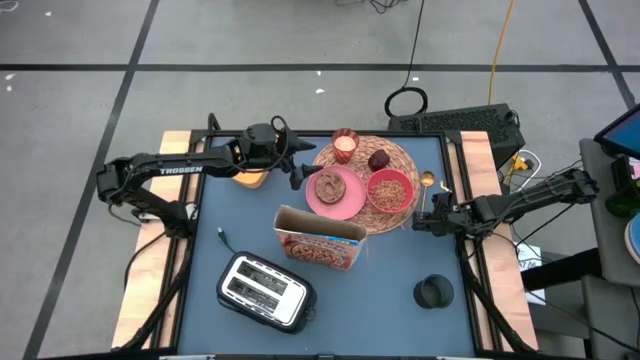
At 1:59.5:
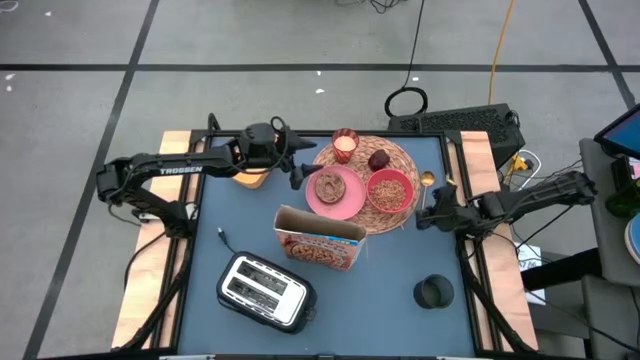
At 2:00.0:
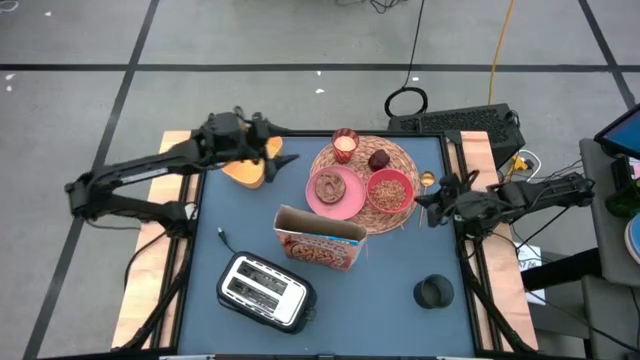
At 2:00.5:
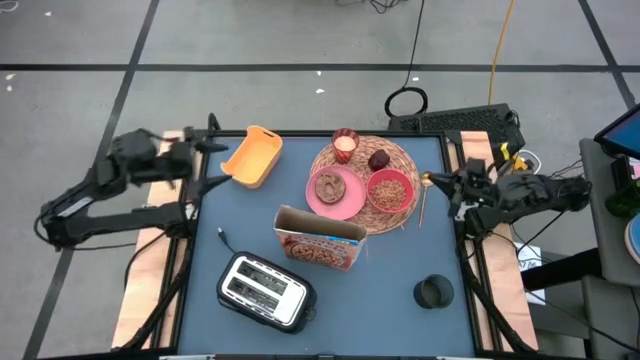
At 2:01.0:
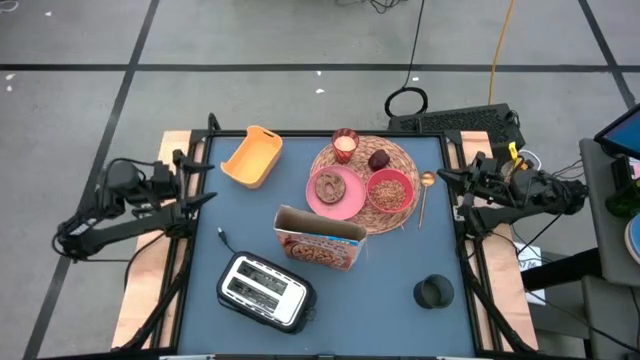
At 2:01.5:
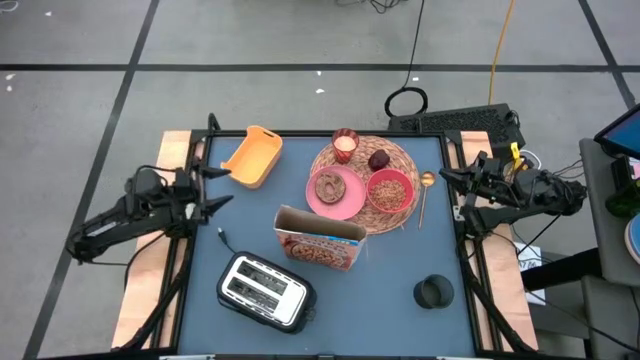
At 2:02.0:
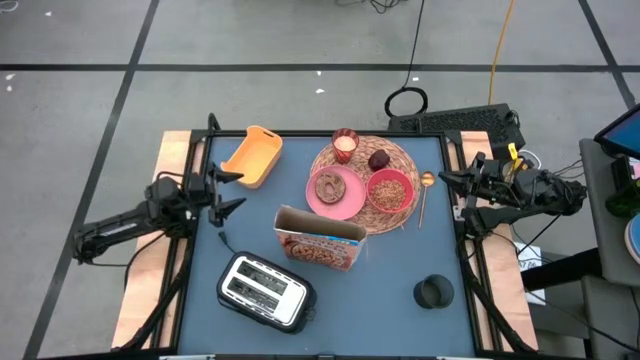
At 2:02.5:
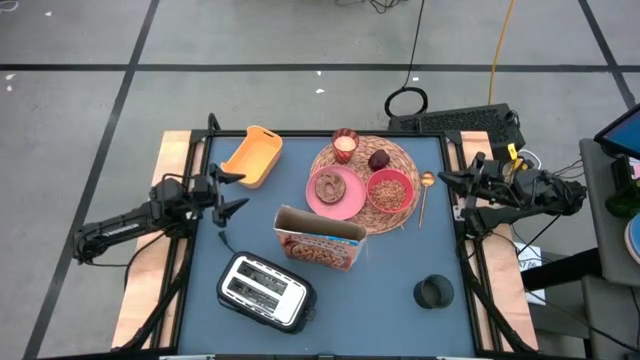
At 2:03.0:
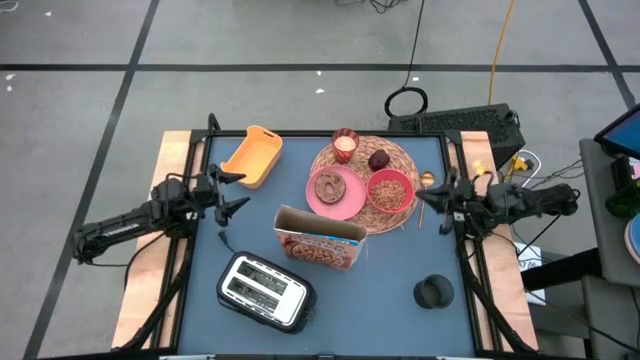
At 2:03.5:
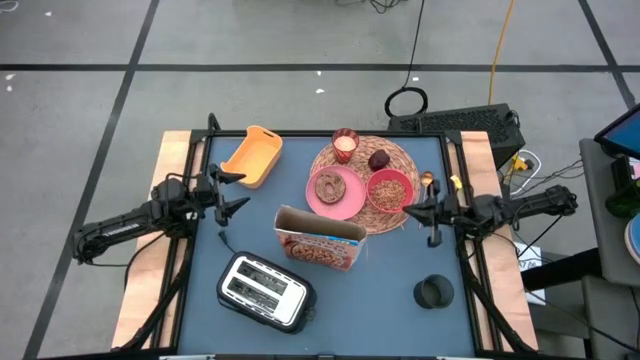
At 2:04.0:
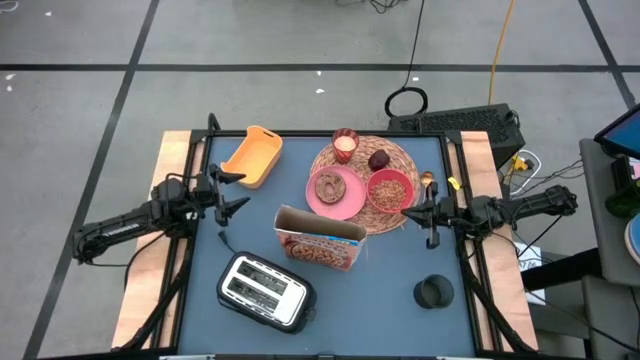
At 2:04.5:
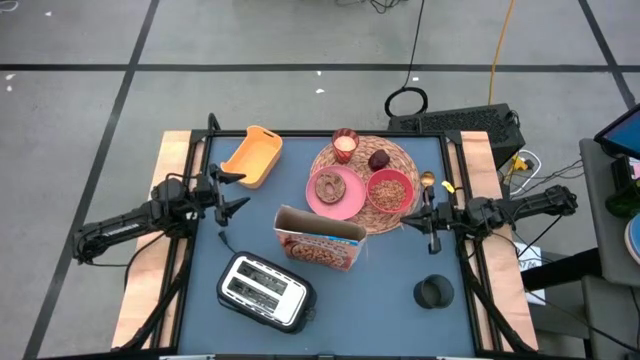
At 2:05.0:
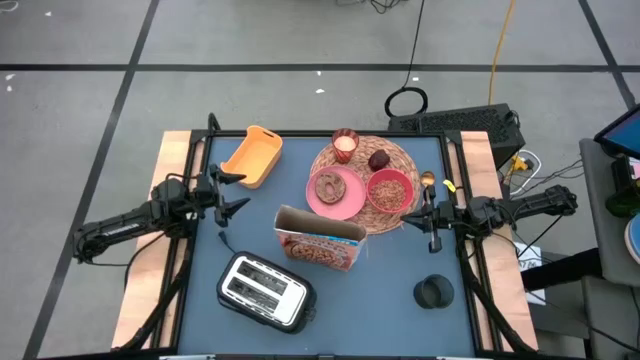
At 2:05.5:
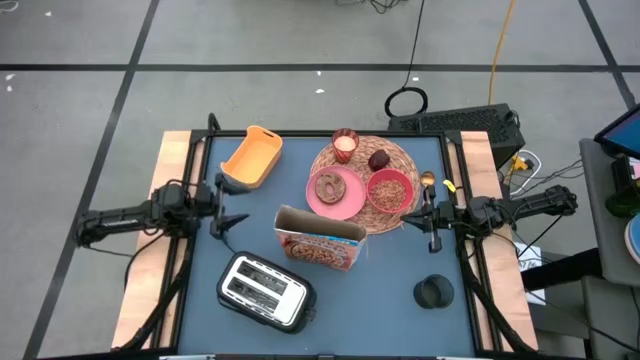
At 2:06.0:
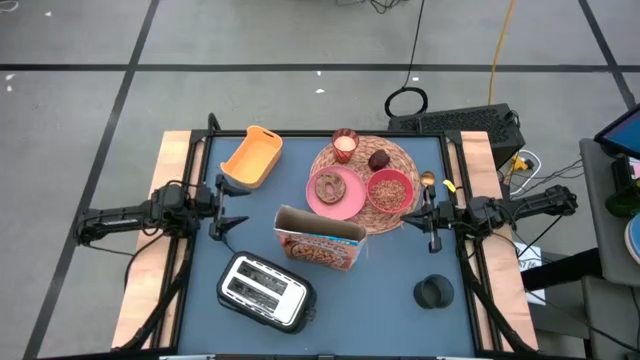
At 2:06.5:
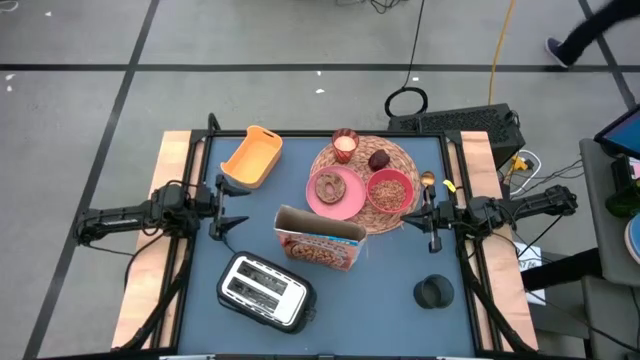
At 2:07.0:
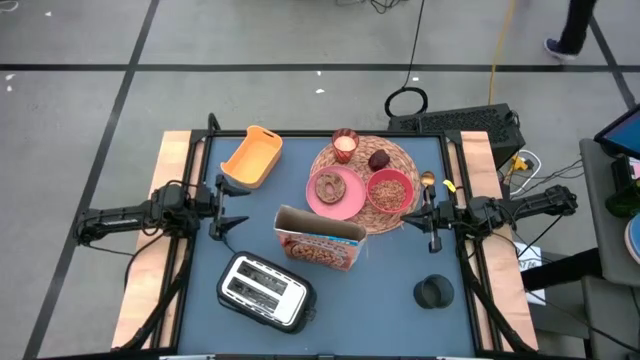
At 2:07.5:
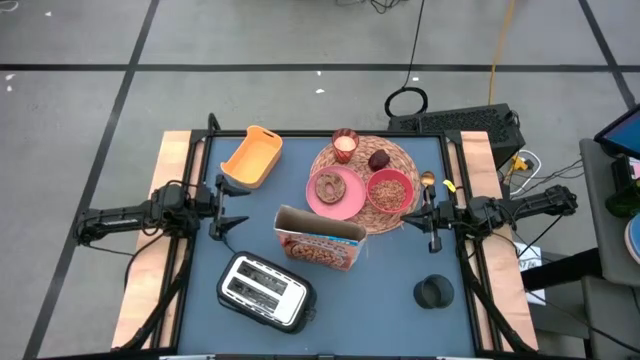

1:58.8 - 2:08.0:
Task: Arrange a breakfast setting
Return to Home Position

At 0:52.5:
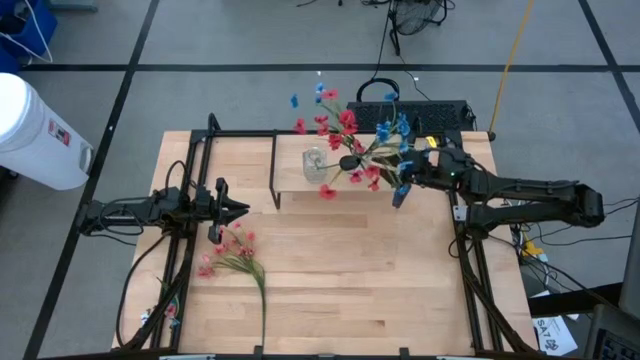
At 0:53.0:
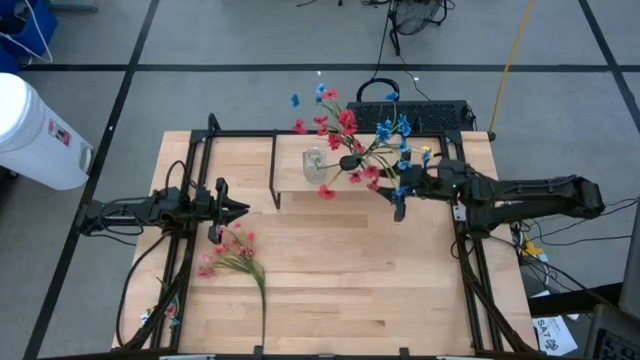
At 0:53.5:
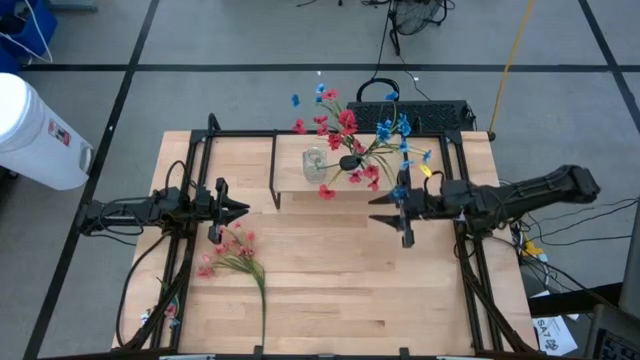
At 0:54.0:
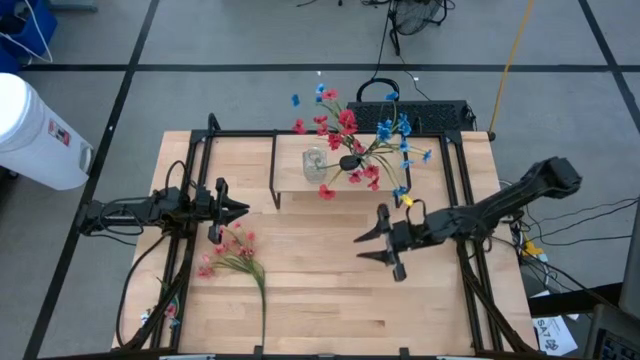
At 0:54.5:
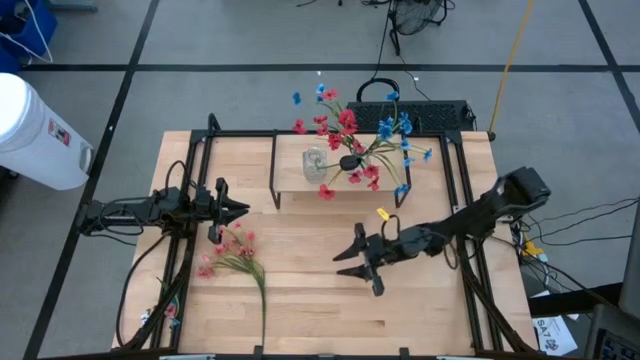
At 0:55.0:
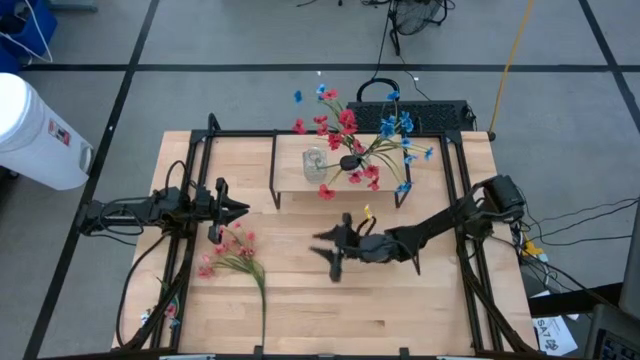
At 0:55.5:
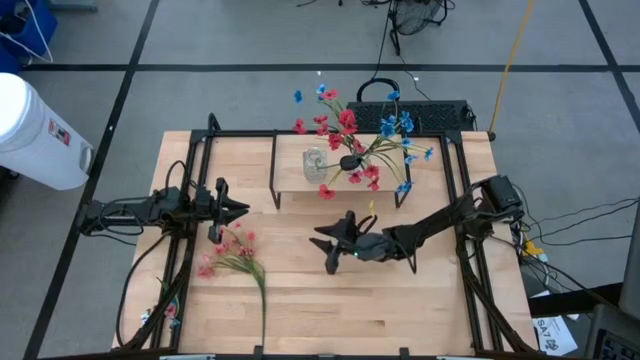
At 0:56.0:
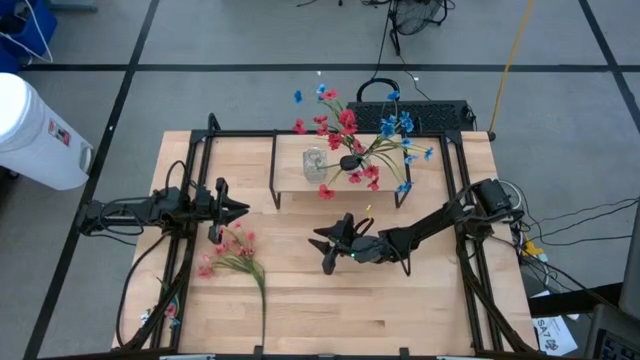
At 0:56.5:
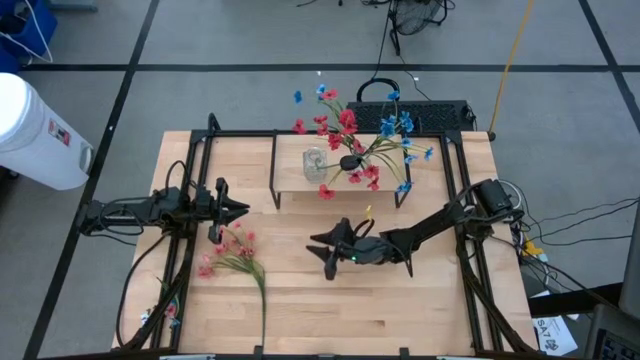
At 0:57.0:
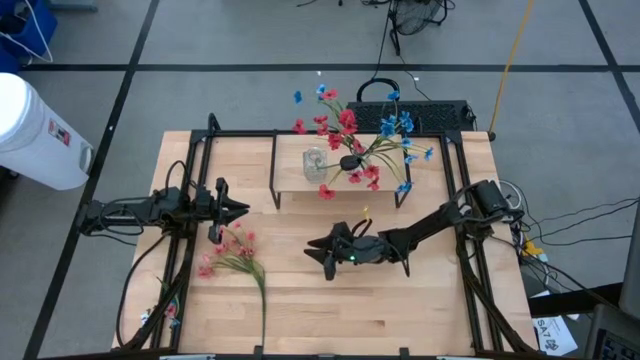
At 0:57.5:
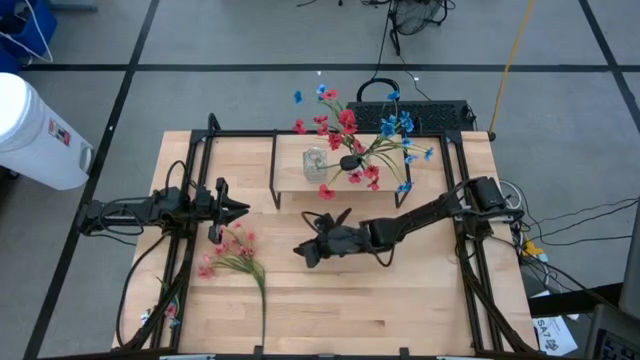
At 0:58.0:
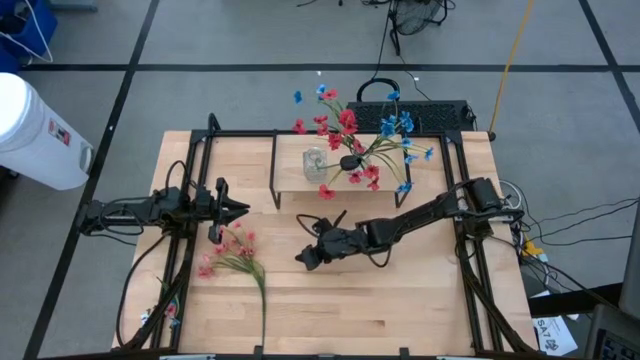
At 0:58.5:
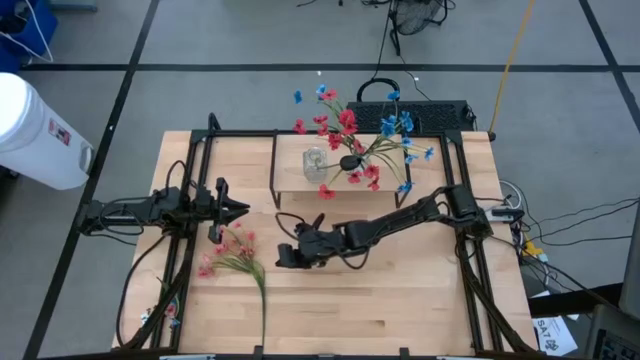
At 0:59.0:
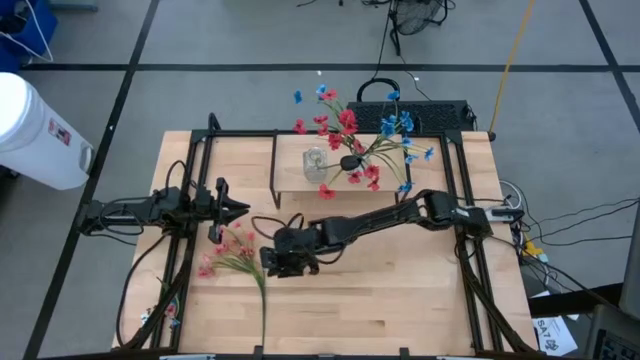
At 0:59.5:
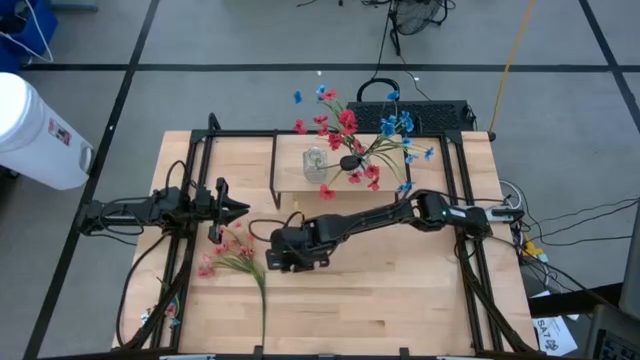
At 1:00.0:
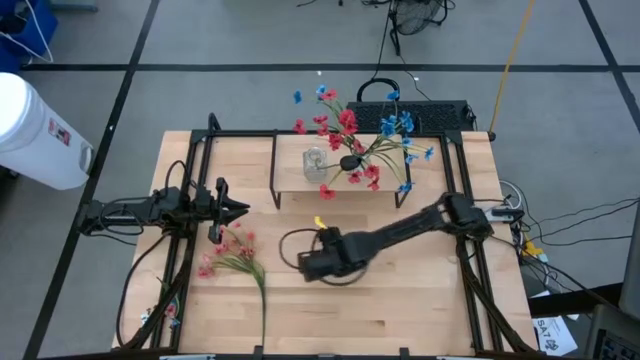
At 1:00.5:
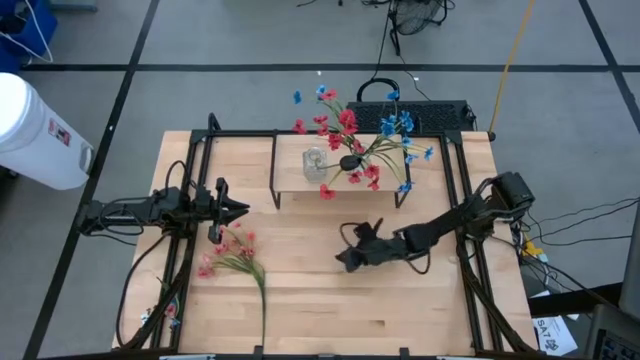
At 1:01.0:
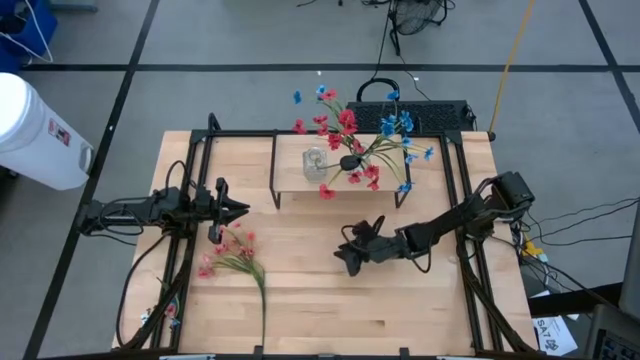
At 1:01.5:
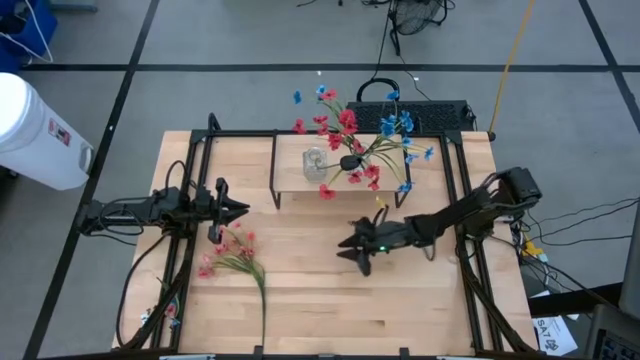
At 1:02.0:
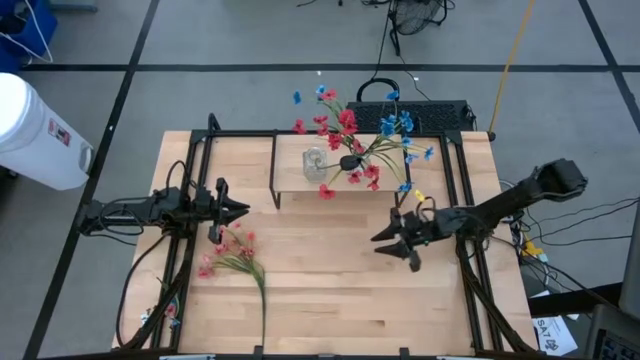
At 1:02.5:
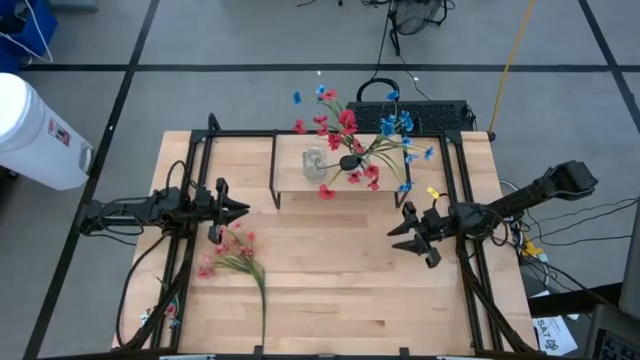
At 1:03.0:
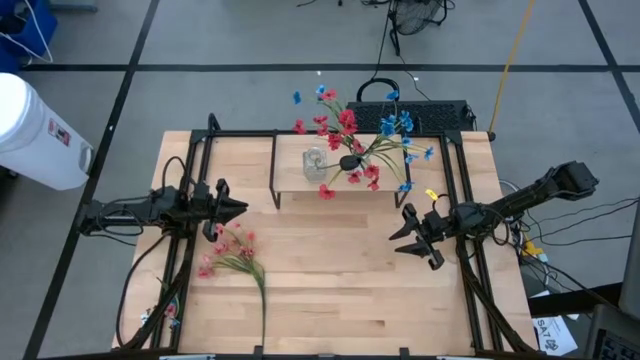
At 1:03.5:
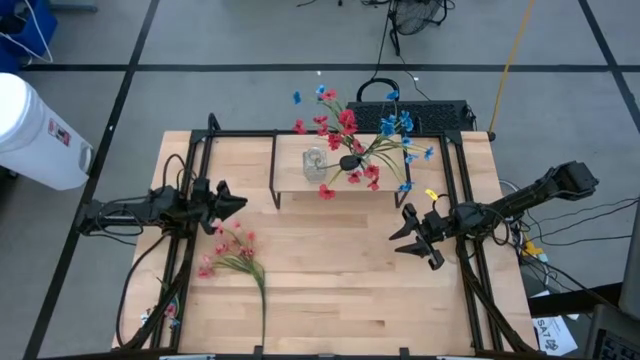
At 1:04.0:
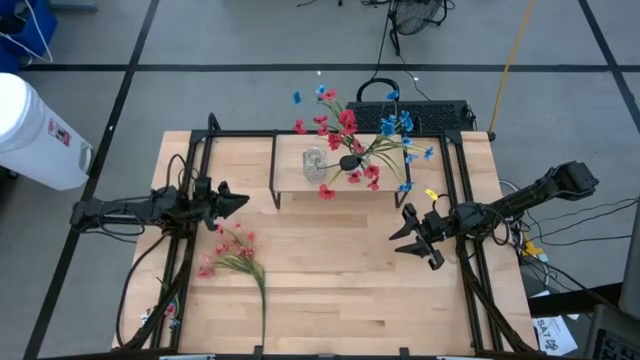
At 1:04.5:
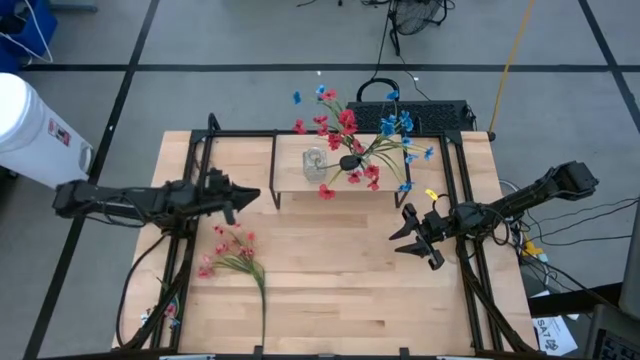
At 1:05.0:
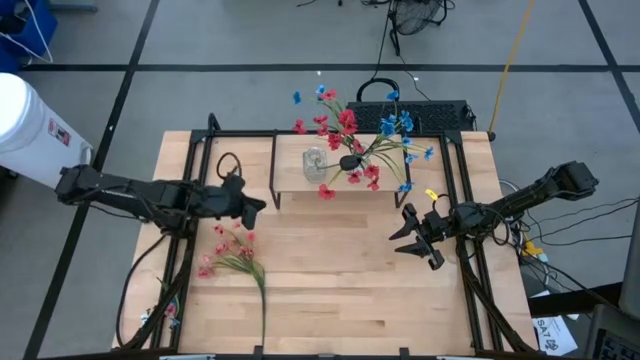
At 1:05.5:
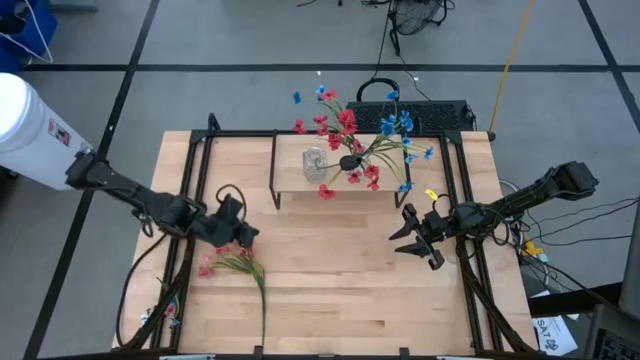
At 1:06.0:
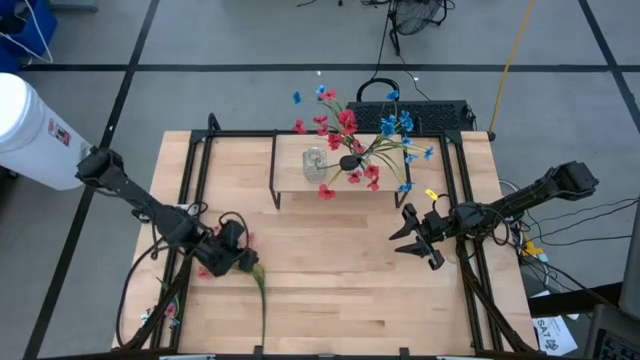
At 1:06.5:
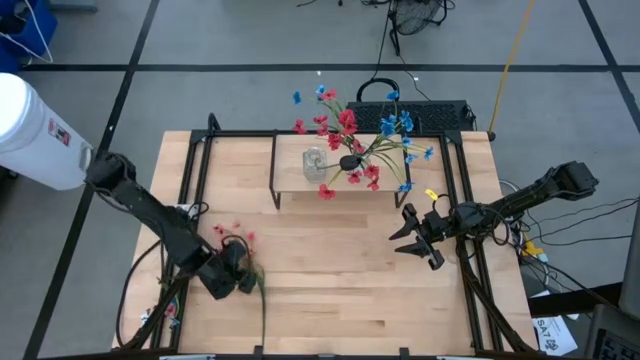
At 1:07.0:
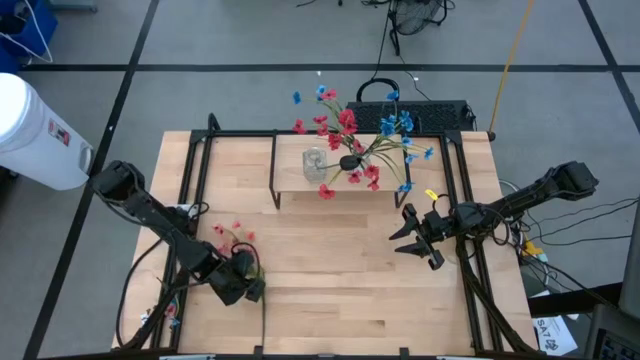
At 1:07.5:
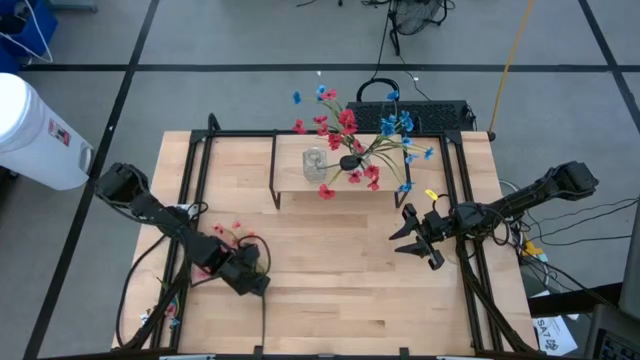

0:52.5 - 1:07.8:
Task: Pick and place flowers into a vace then onto a shelf
Put the pink flowers into the left transparent vase on the shelf
